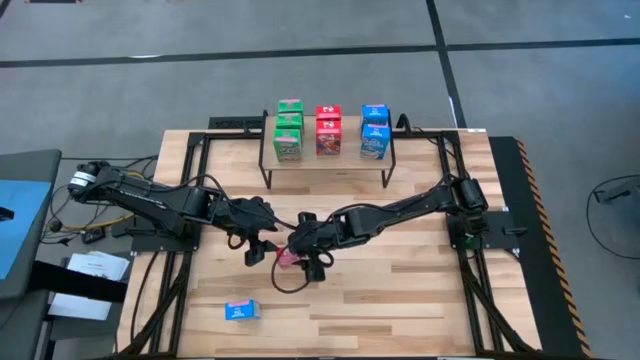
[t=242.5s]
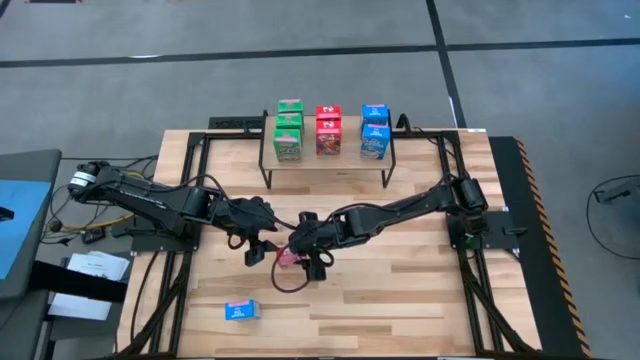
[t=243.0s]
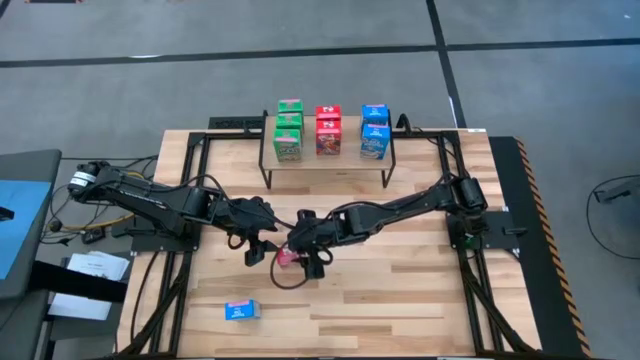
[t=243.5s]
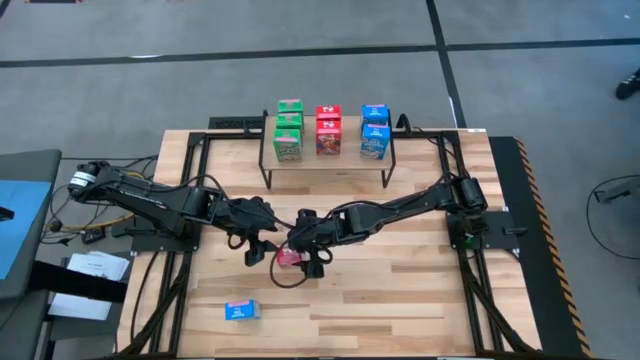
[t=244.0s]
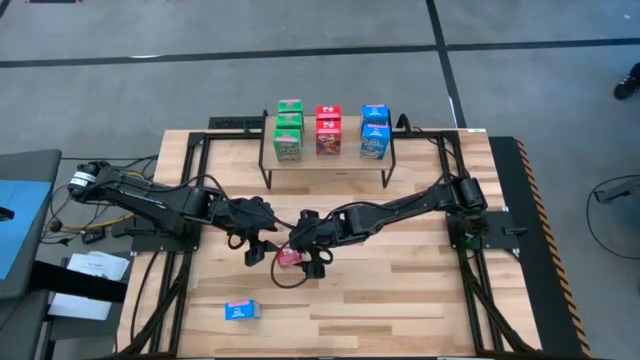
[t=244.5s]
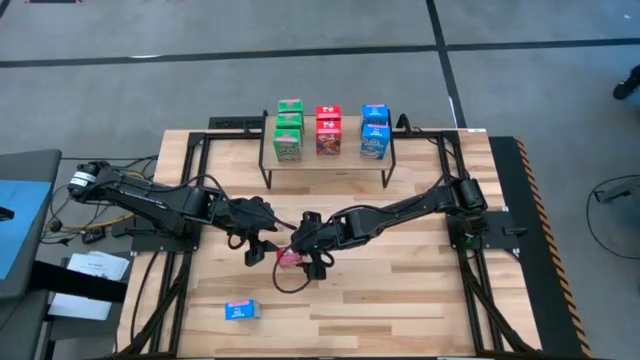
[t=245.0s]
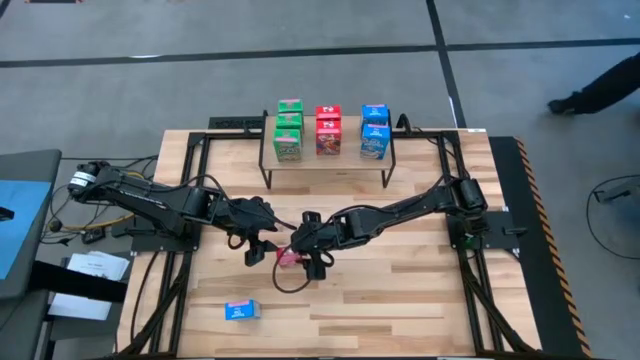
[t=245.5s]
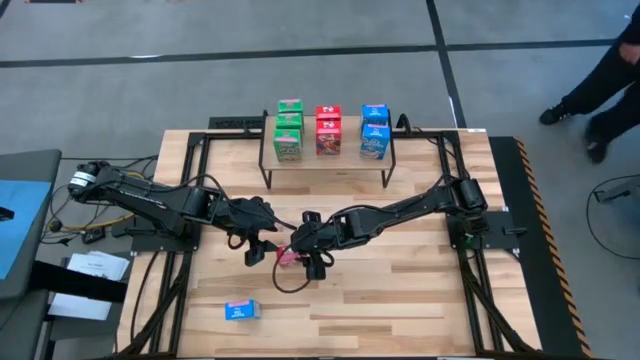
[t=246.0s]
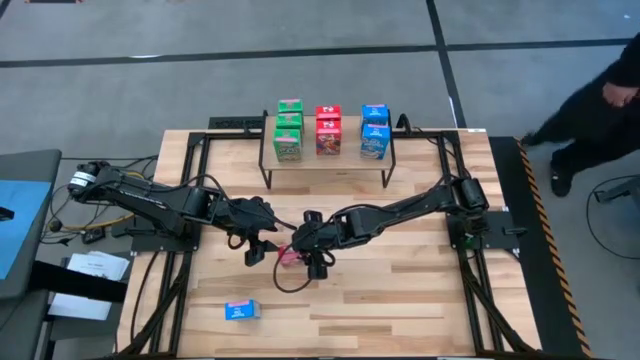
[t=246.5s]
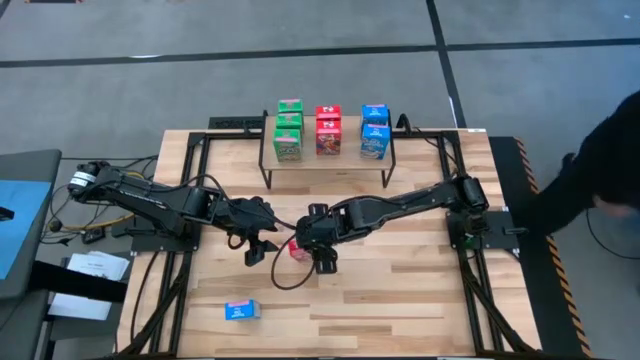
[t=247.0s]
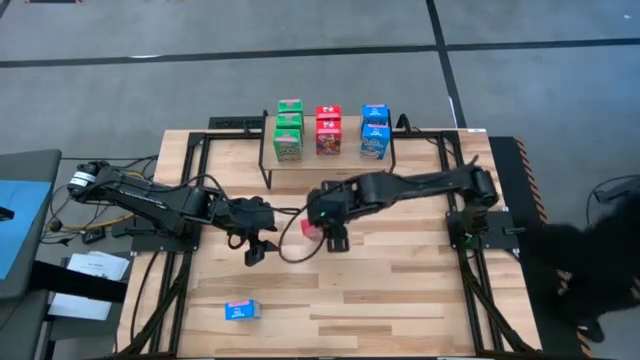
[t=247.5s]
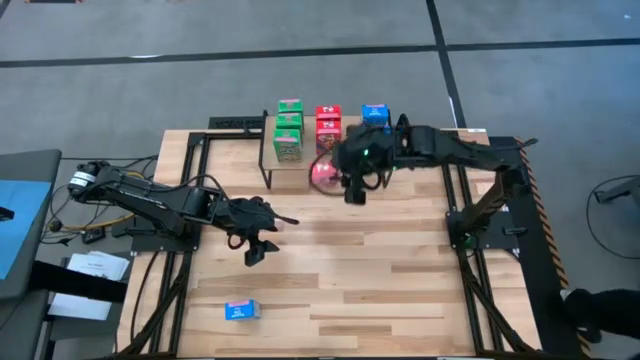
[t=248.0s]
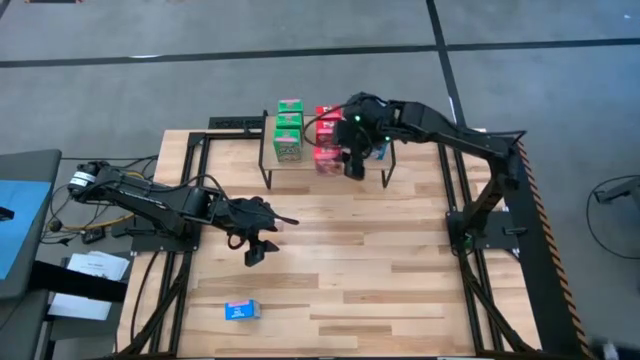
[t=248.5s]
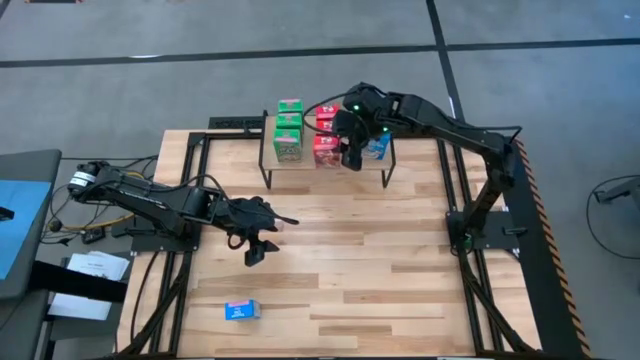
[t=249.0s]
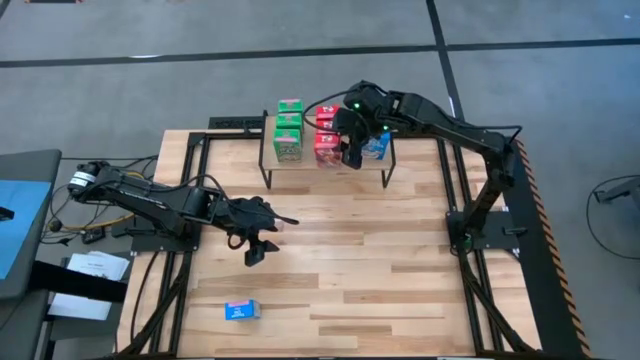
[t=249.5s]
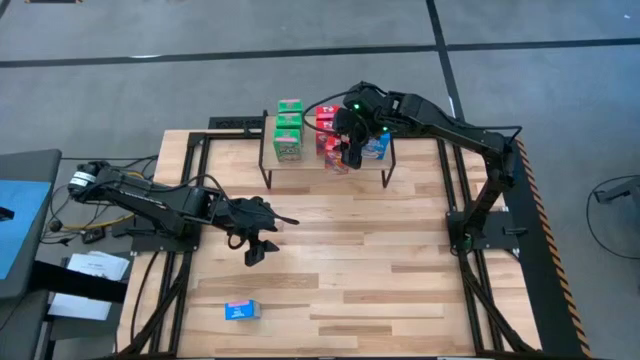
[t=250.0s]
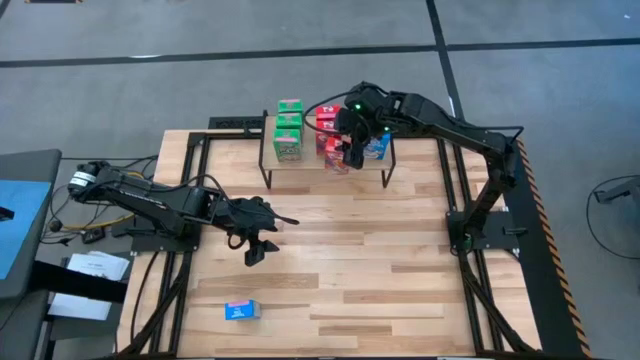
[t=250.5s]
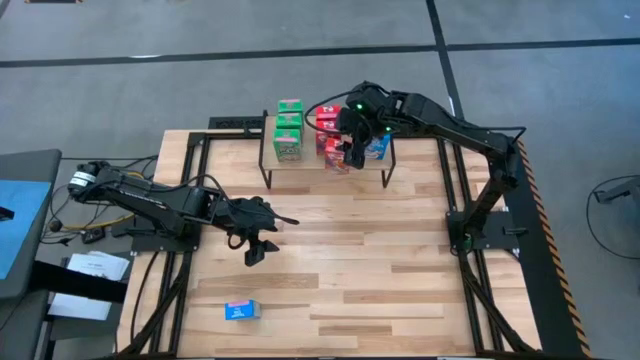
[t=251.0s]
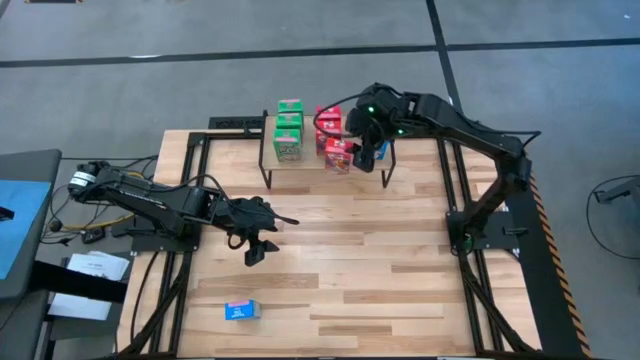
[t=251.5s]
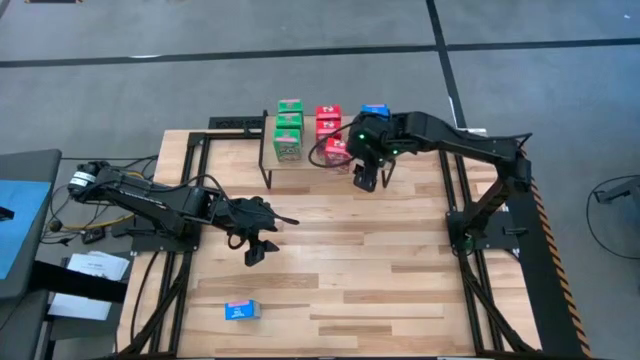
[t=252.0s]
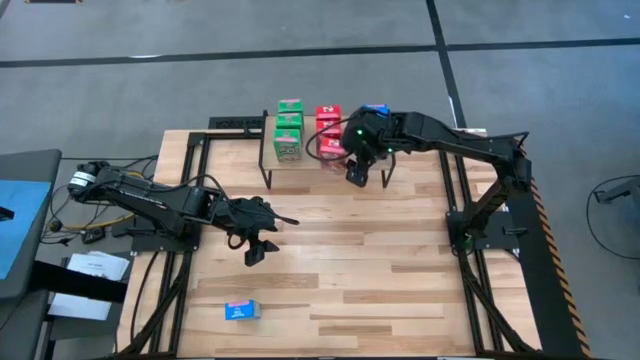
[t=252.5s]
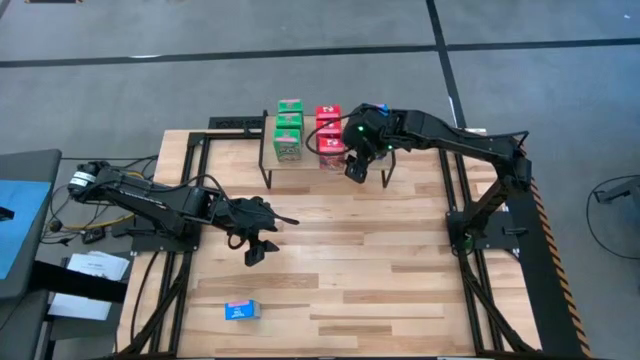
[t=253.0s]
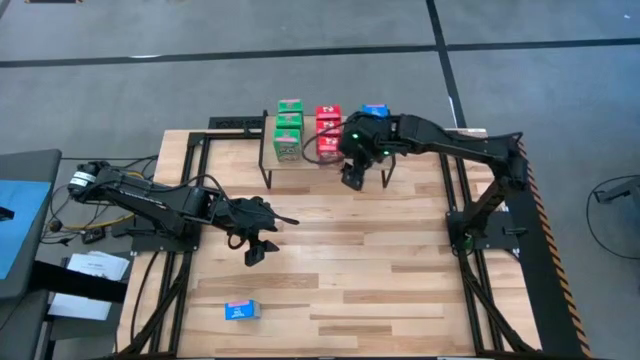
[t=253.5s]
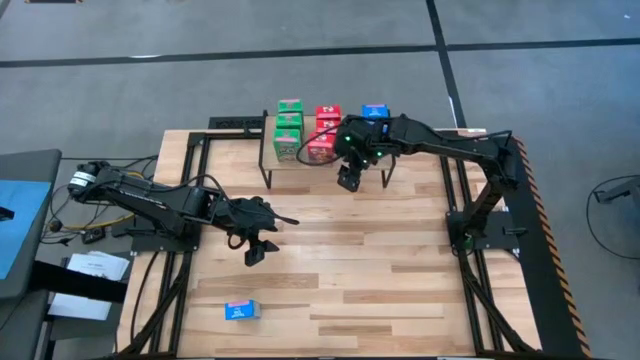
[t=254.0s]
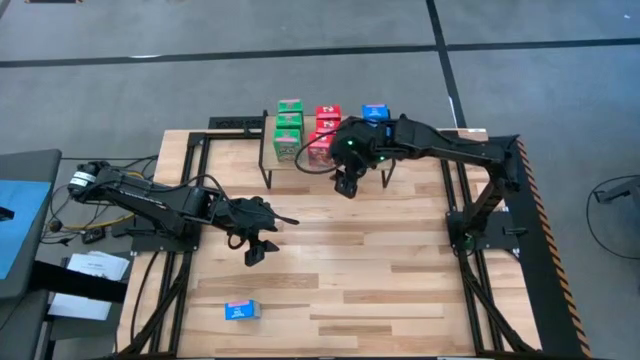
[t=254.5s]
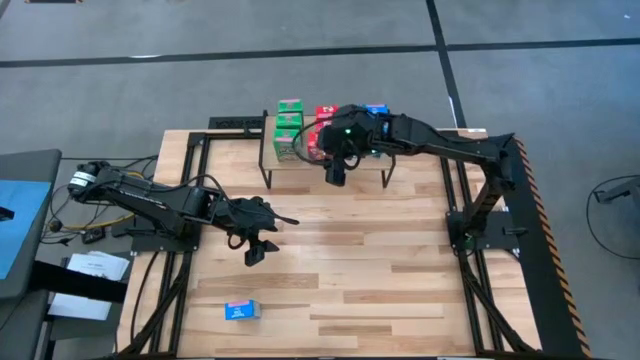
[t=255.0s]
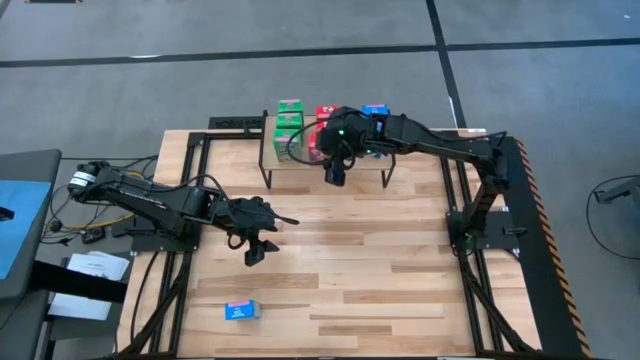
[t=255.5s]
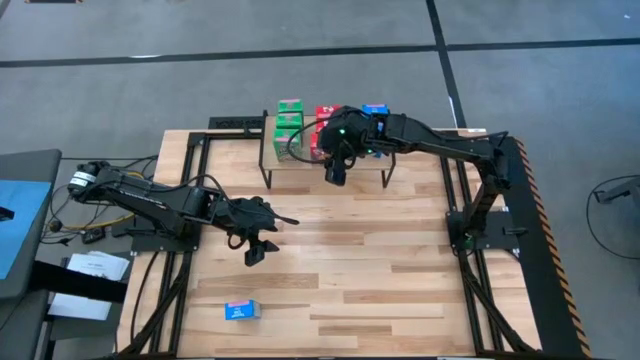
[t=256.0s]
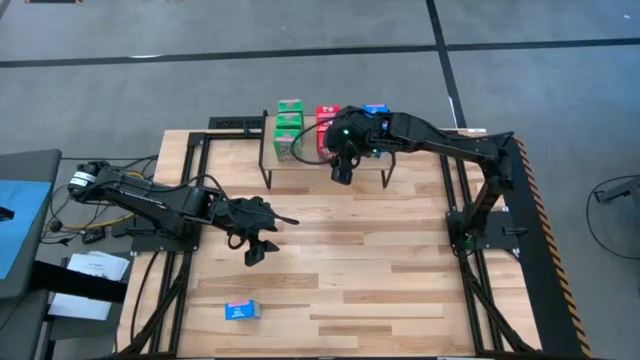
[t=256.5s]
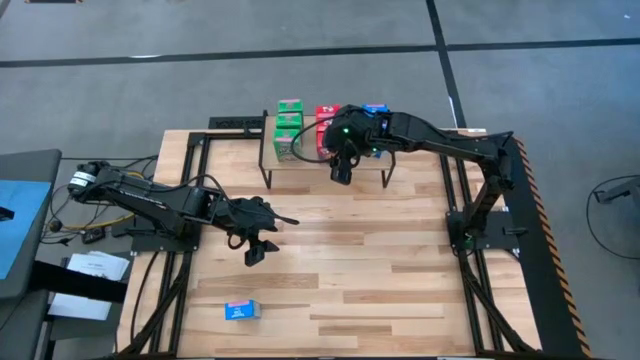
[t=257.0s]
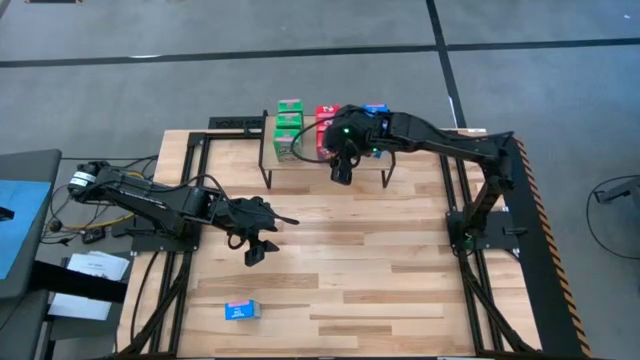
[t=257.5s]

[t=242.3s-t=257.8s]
Task: Stack cereal on shelf
Put the red cereal box on the shelf aligned with the other red cereal boxes

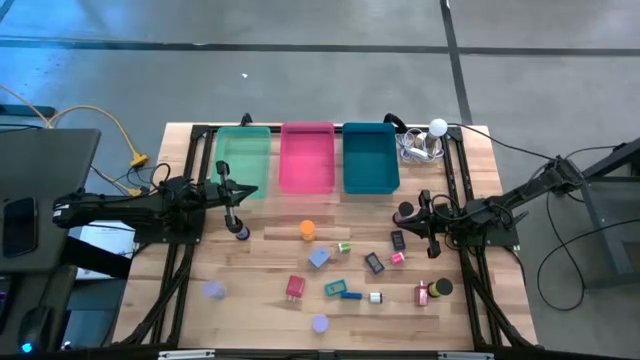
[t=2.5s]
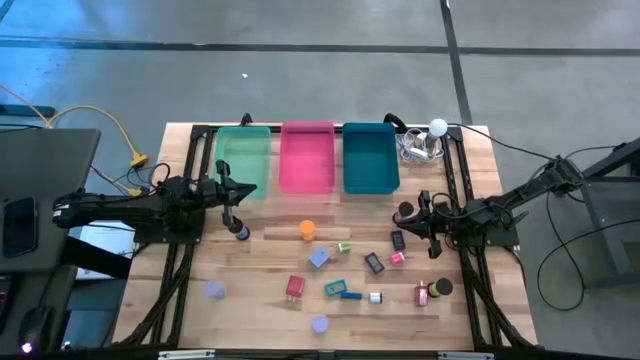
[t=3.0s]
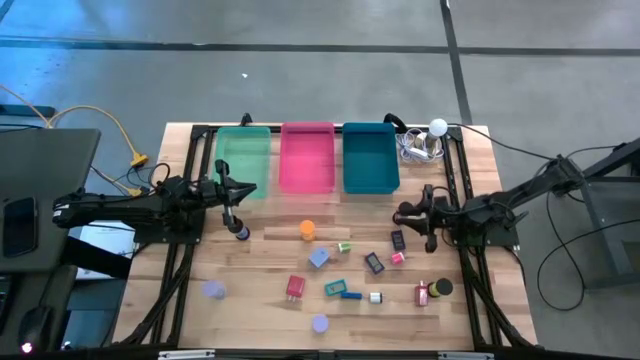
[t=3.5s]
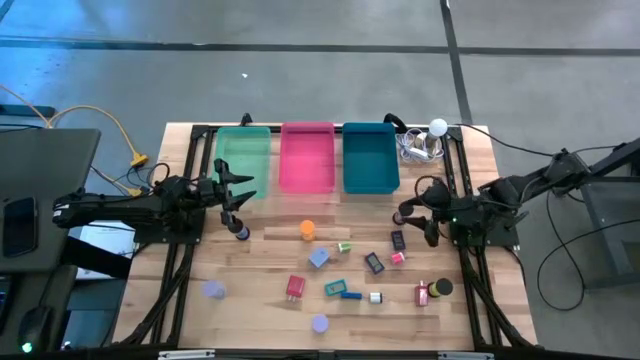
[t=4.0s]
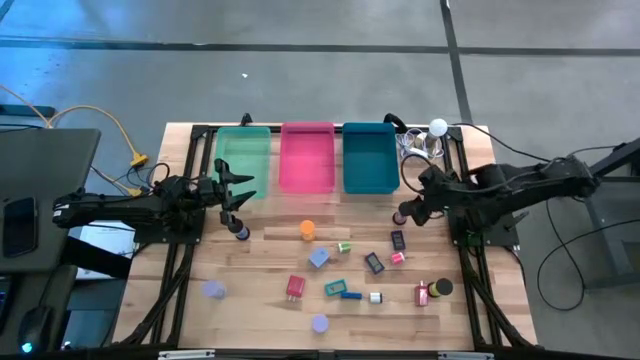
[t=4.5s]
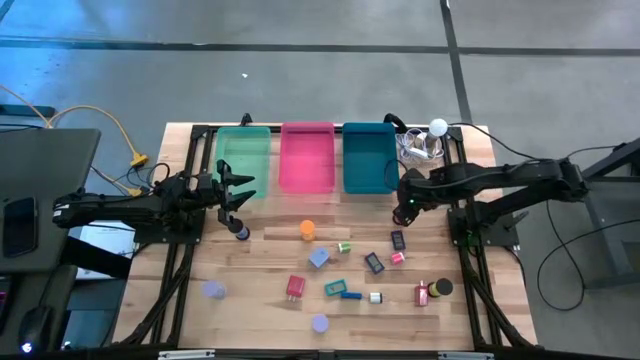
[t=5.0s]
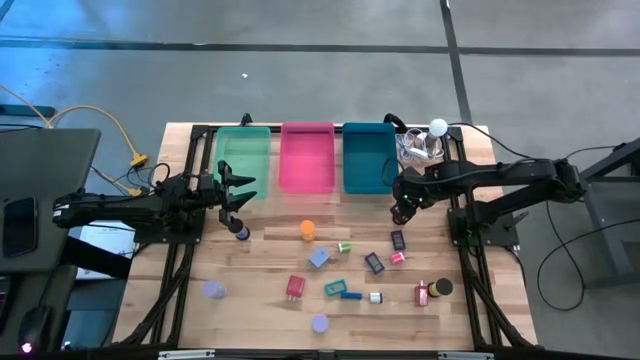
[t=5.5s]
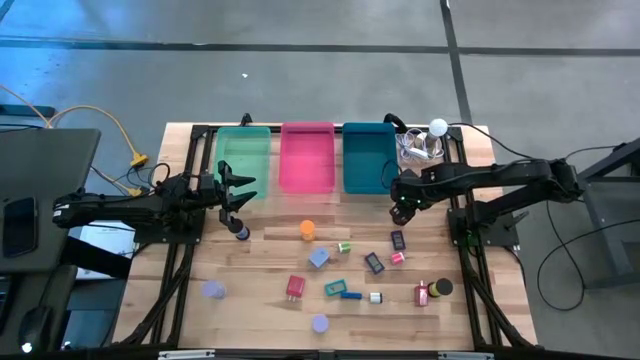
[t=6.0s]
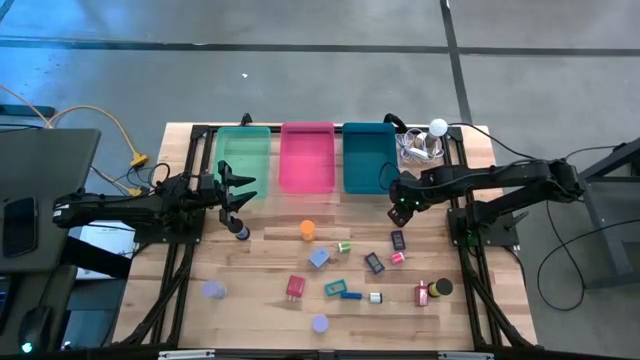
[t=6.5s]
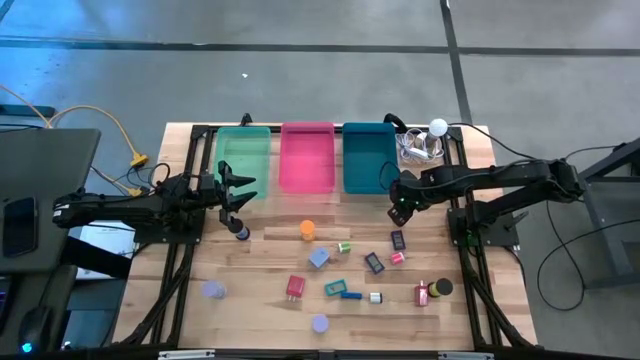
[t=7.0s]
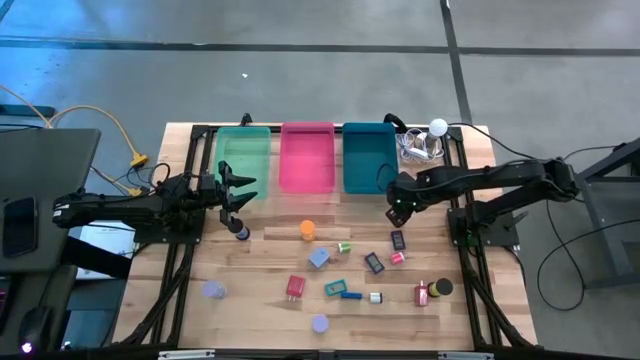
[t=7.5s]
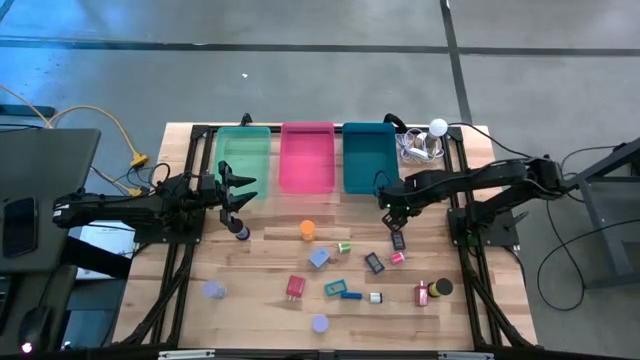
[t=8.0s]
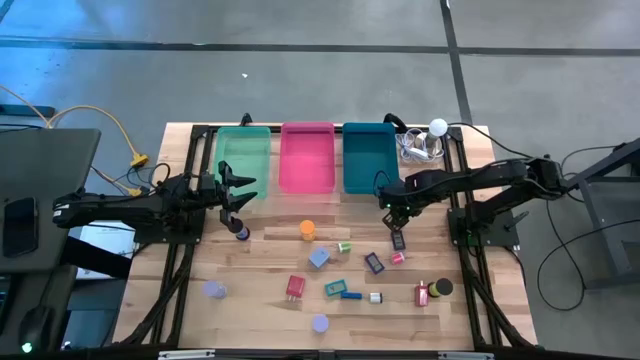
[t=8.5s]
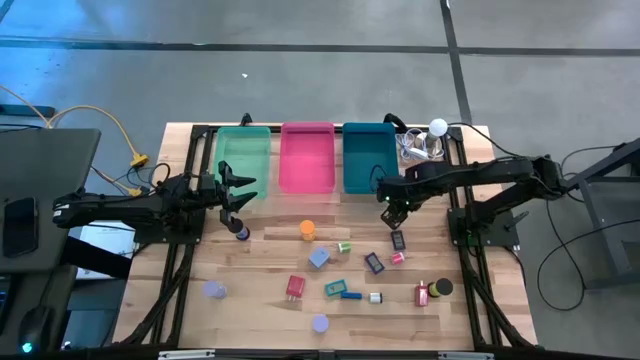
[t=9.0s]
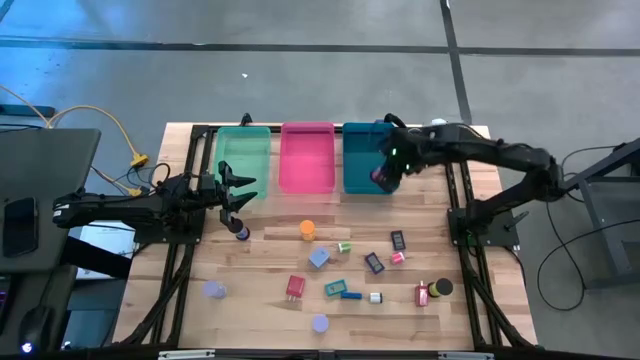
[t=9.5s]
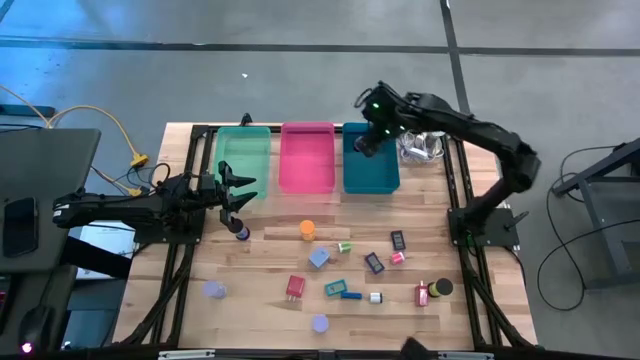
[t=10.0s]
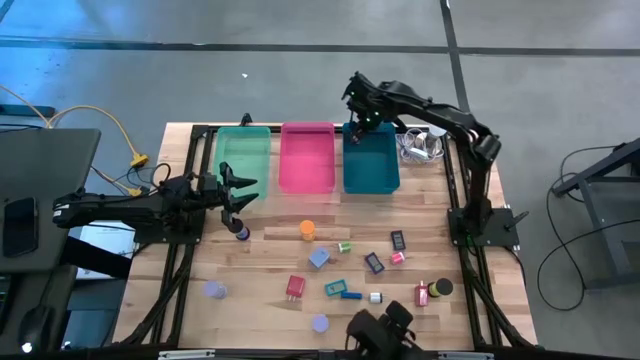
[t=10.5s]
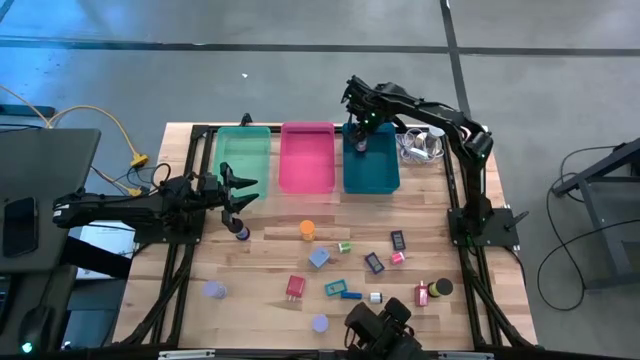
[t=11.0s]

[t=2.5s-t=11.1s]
Task: Pick & Place Office items
Put the red hourglass into the blue bin
